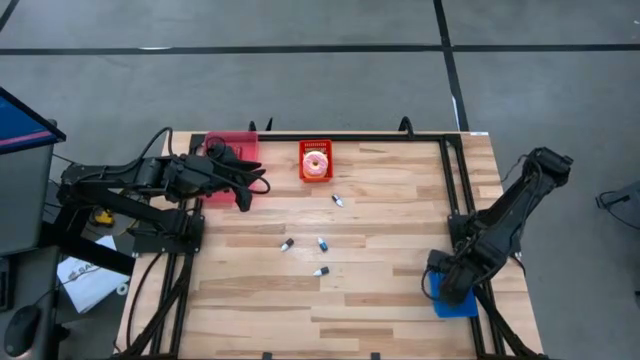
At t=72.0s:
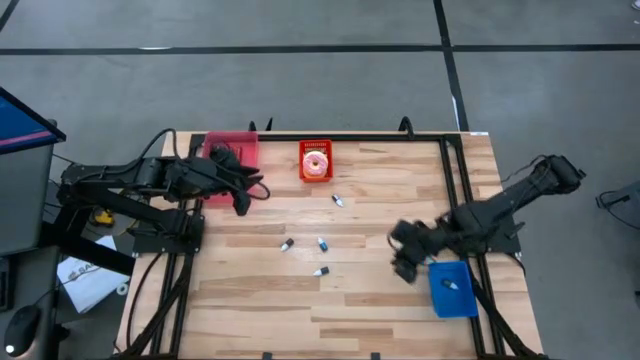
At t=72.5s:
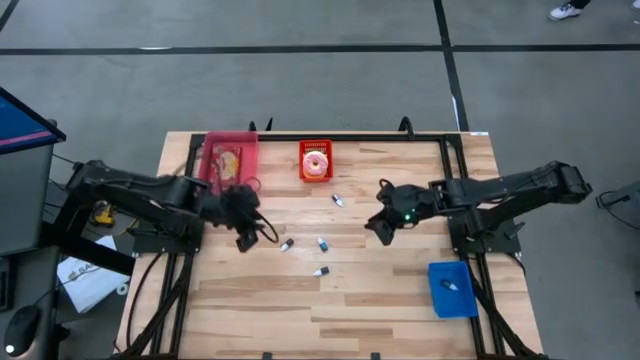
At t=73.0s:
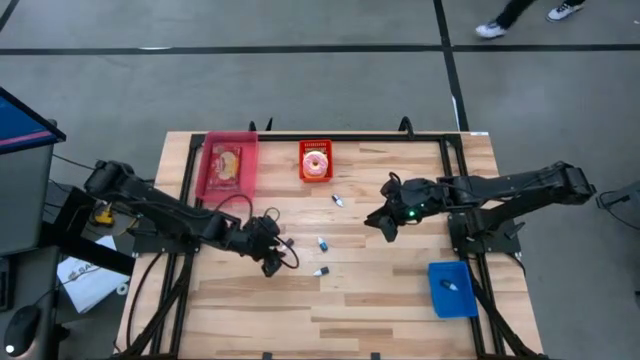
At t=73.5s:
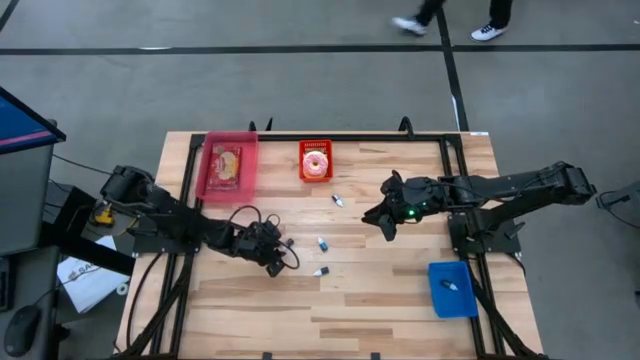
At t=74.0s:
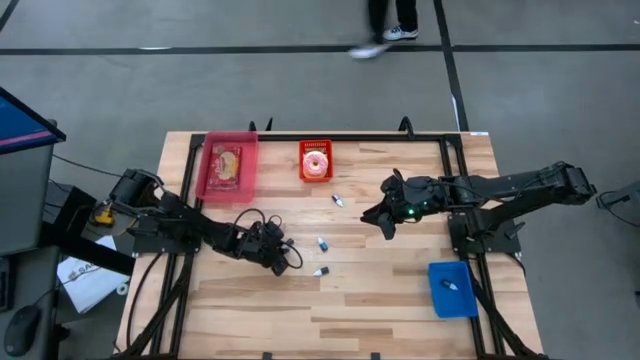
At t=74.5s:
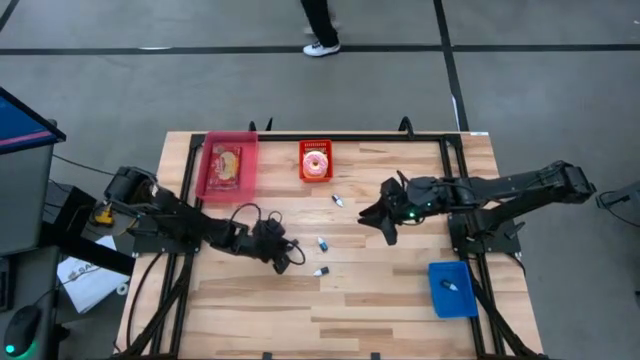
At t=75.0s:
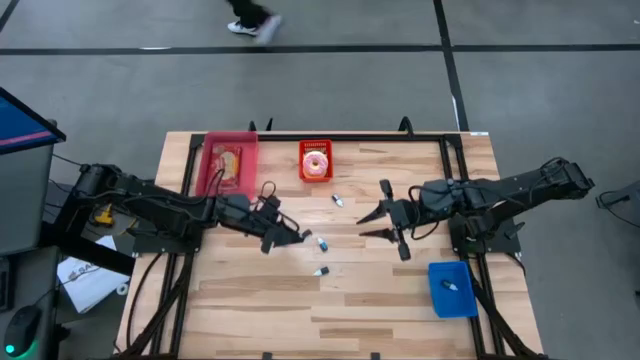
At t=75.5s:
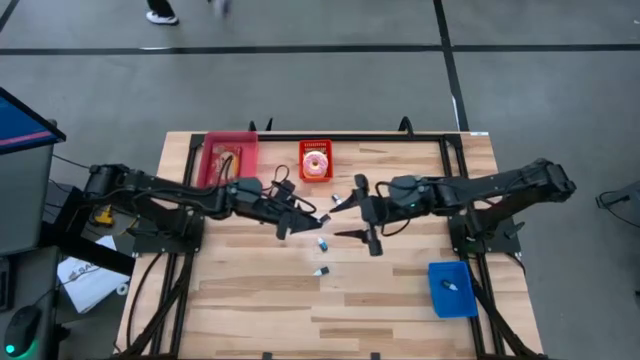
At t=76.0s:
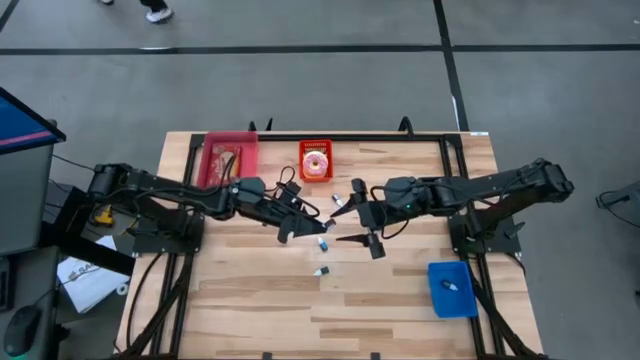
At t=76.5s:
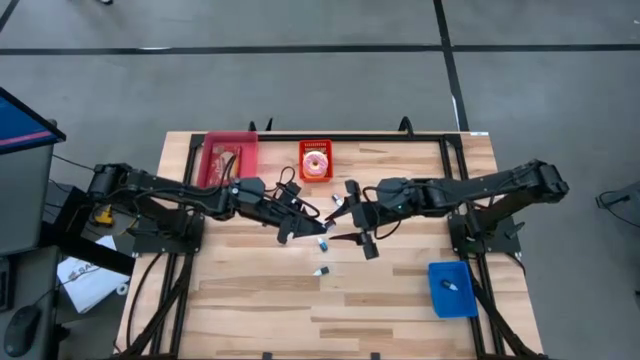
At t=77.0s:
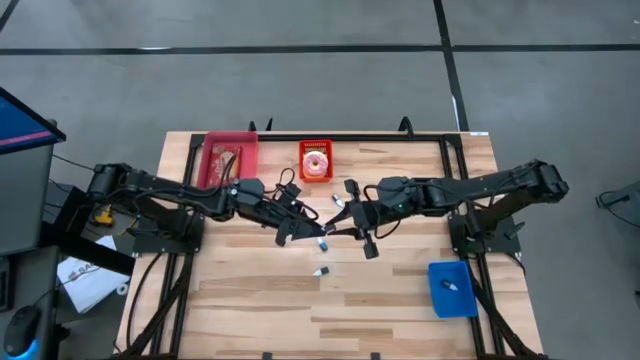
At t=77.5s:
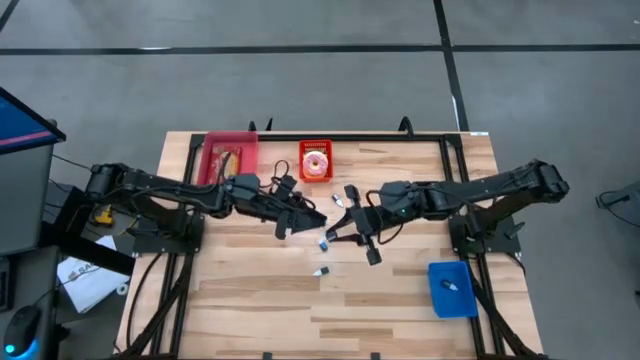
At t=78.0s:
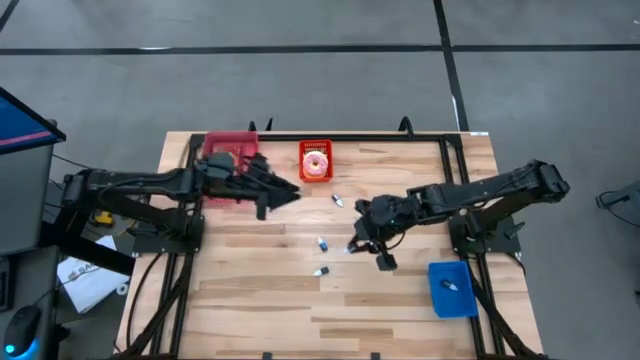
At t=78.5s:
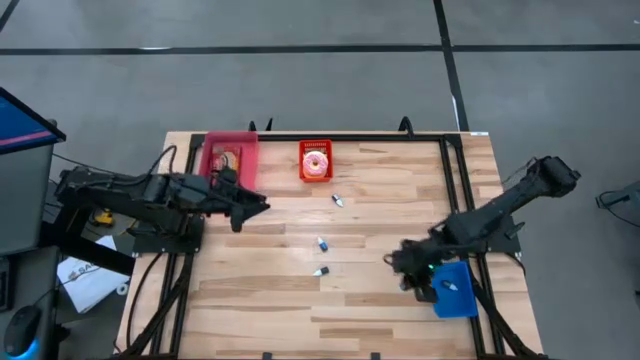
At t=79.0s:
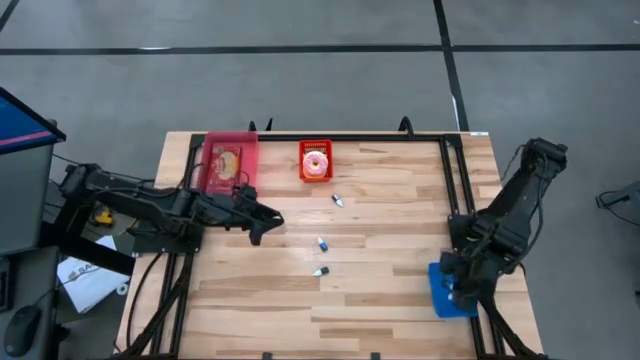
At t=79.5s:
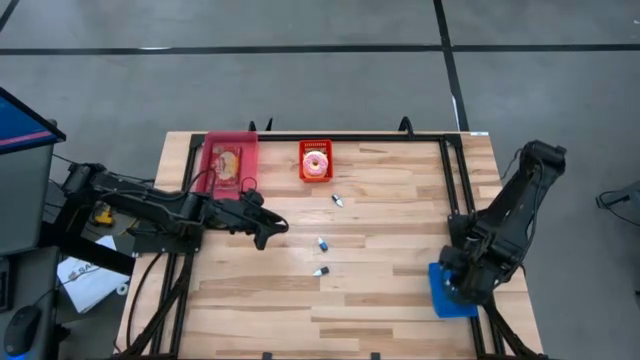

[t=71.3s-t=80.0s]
Put the bottom red food coloring into the blue bin

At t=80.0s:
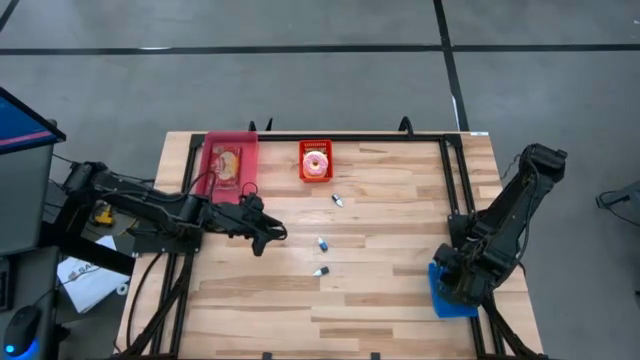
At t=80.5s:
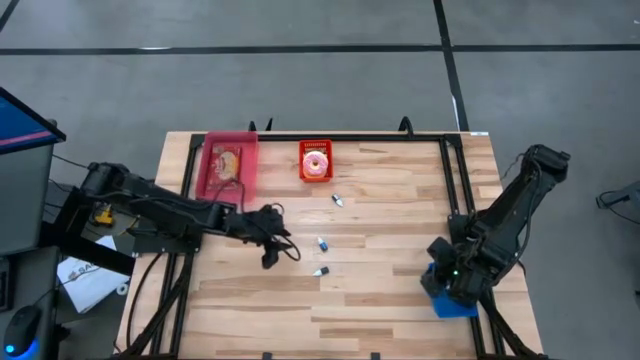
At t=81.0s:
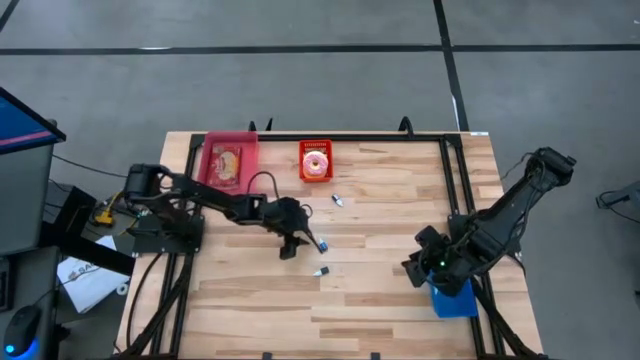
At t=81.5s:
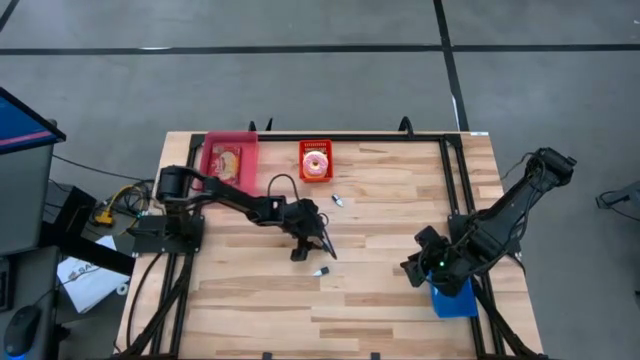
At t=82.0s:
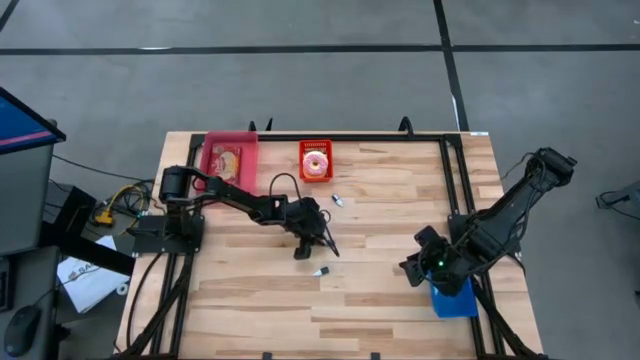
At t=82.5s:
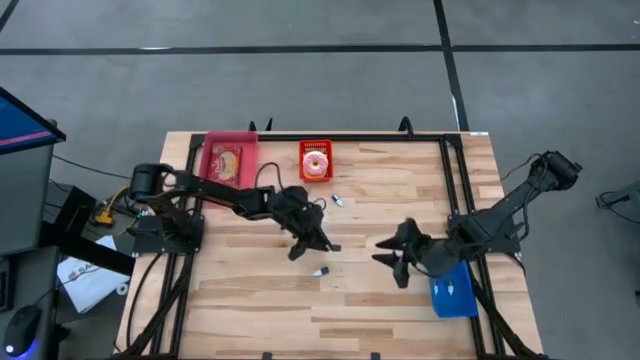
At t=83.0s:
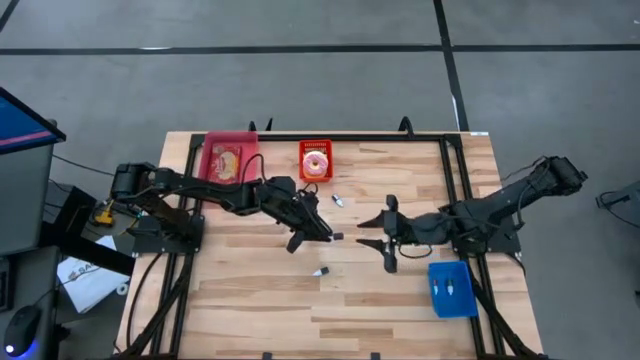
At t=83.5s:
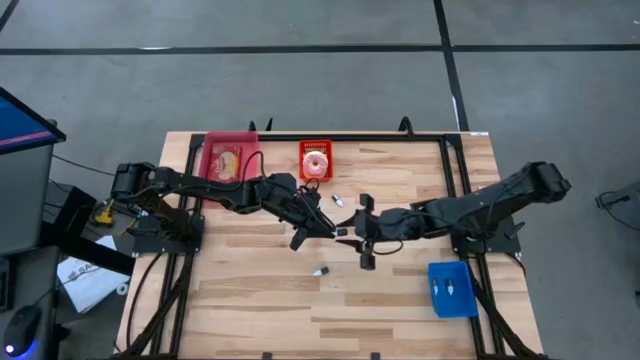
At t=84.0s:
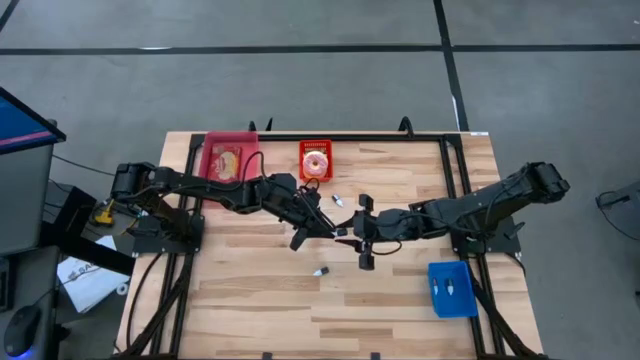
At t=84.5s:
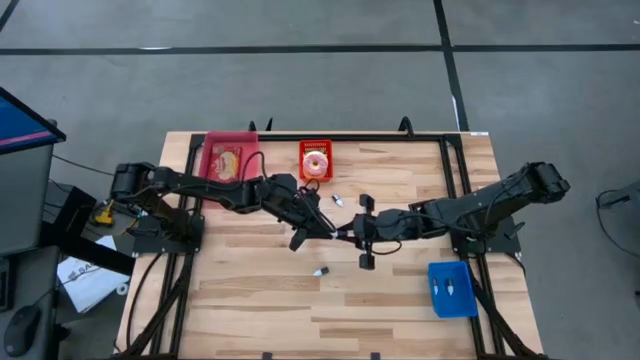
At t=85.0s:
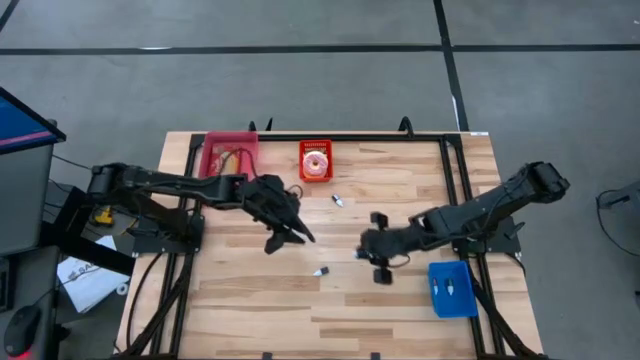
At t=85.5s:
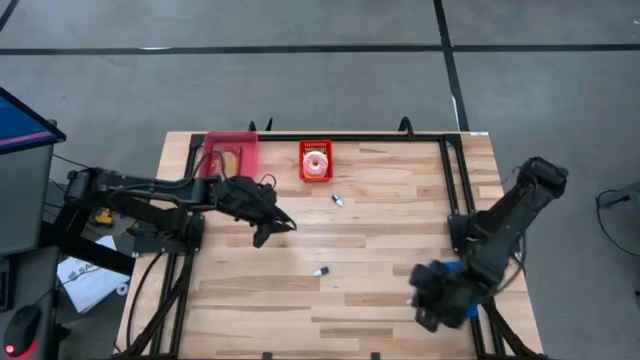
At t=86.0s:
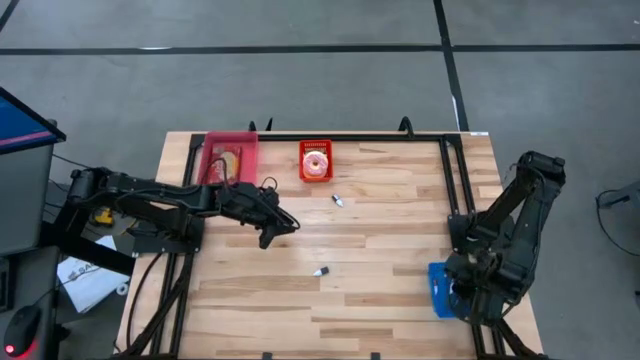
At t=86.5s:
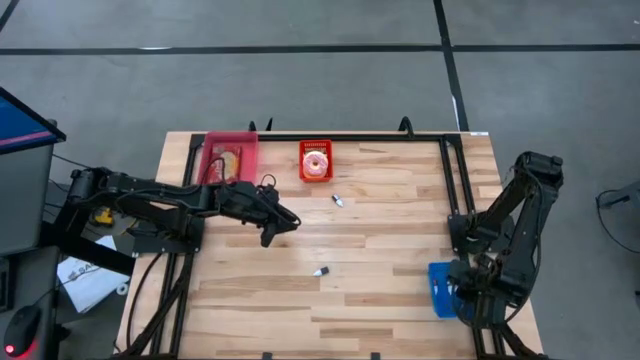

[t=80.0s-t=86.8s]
Put the blue food coloring into the blue bin

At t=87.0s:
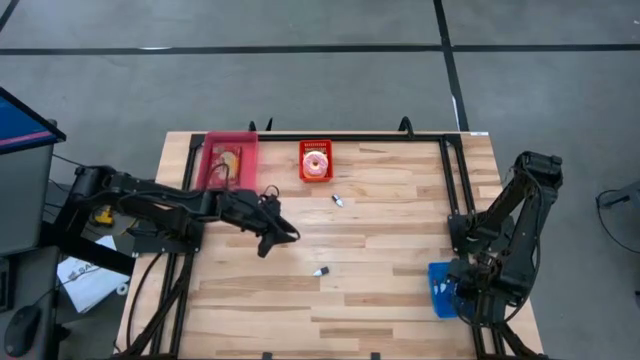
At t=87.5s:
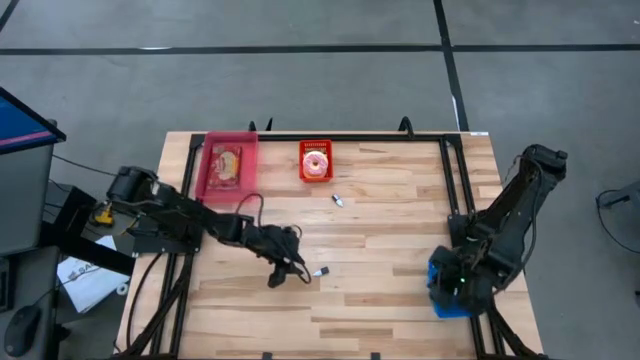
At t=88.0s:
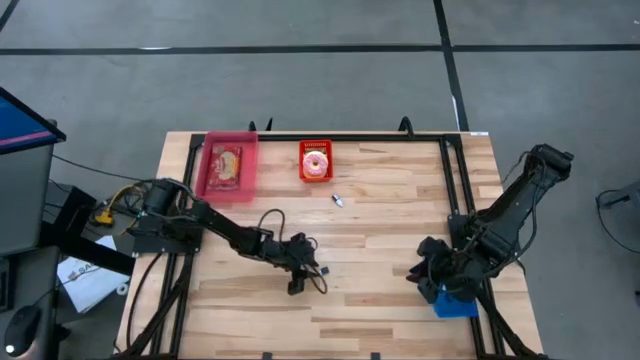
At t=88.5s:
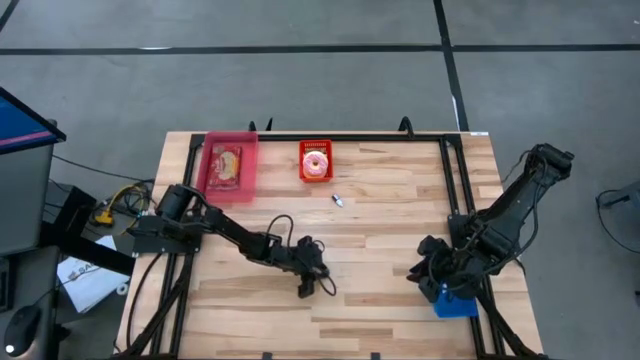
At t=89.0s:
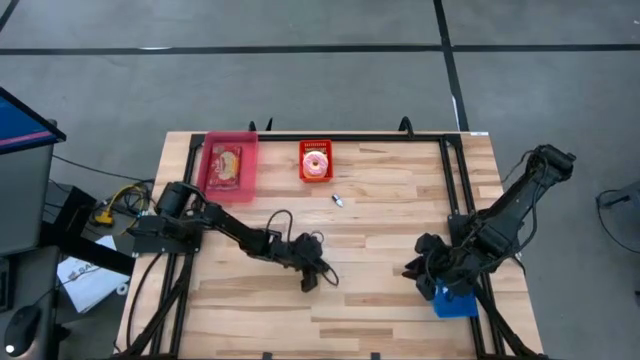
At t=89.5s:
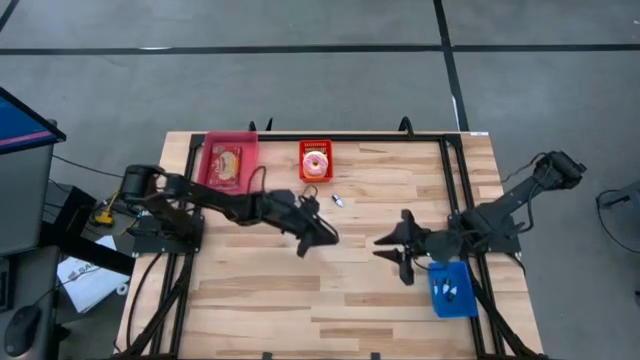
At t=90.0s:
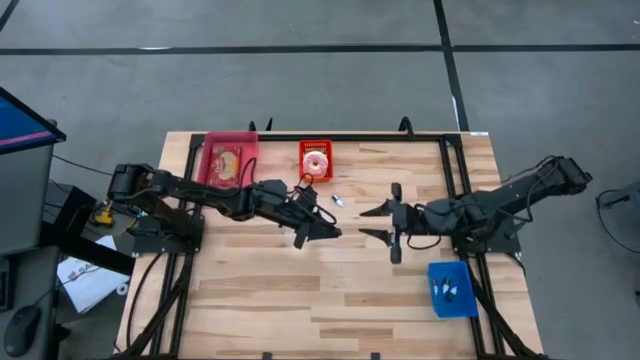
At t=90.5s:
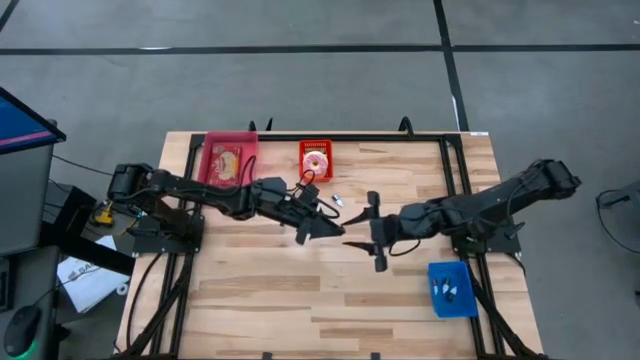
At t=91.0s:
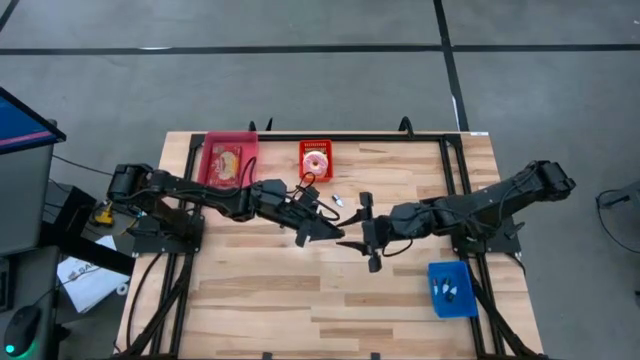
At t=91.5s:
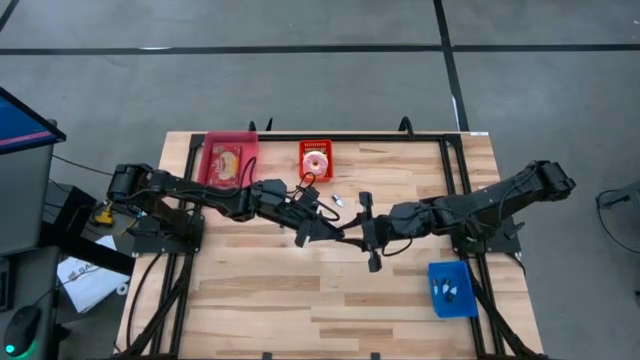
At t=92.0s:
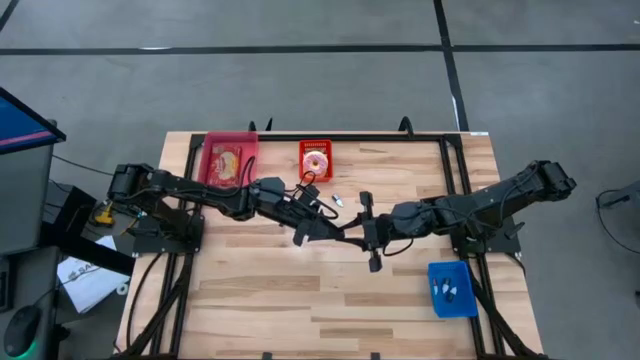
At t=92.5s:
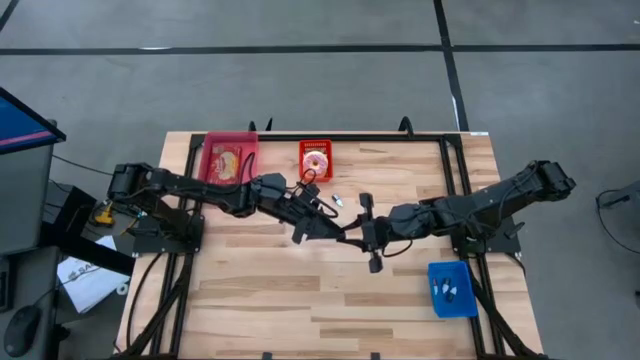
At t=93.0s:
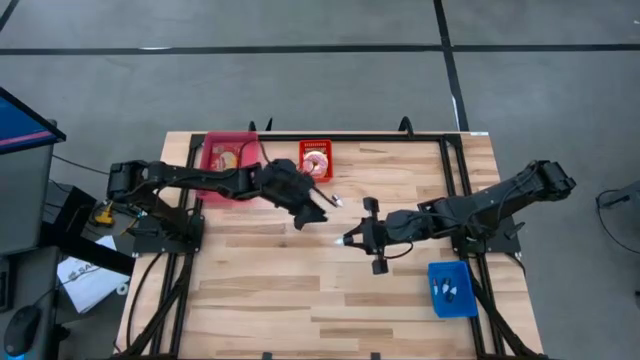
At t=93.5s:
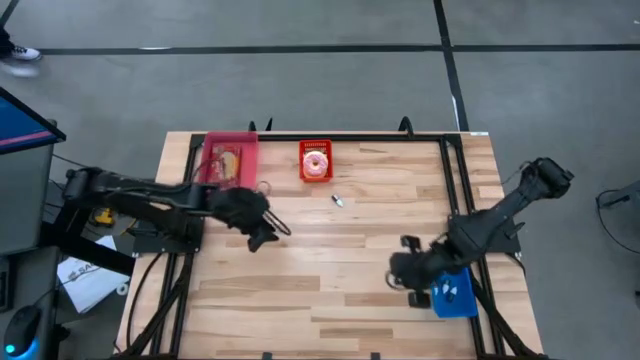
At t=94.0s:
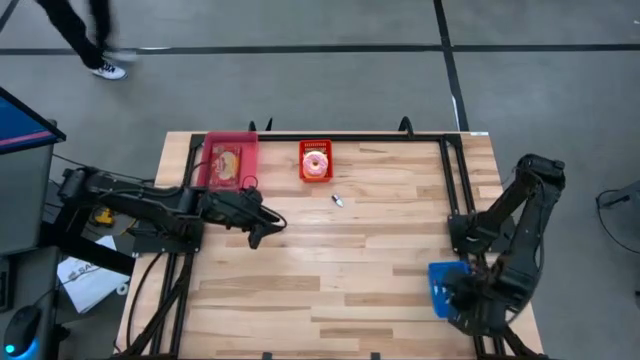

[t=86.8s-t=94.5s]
Put the black food coloring into the blue bin
